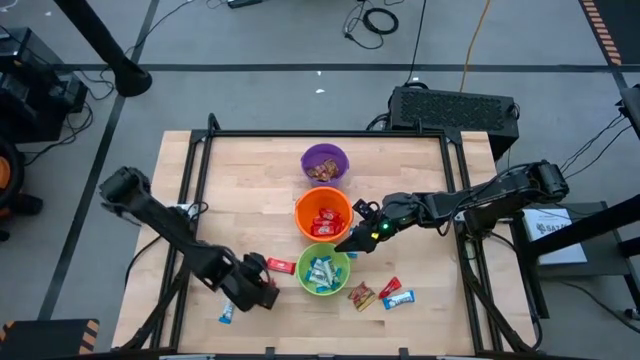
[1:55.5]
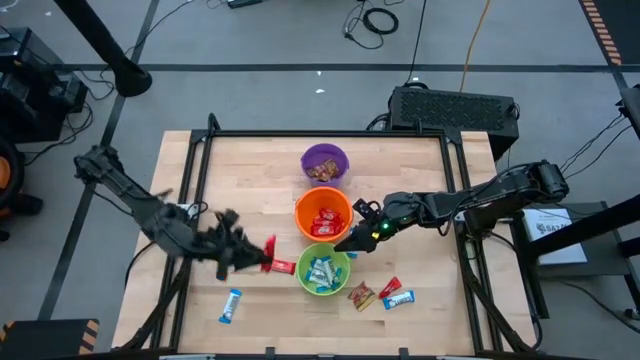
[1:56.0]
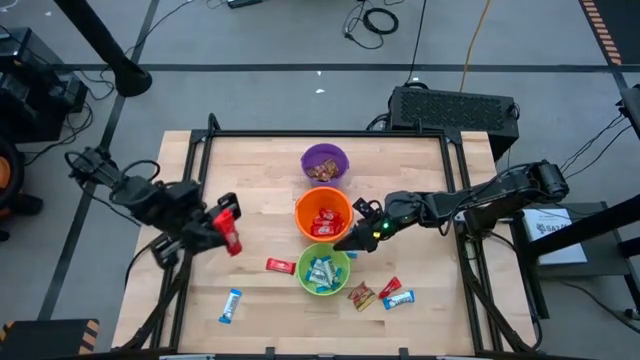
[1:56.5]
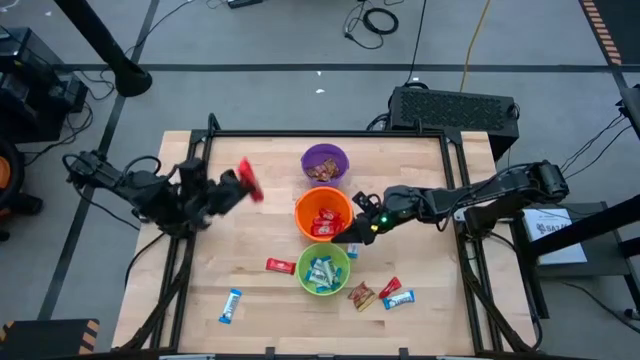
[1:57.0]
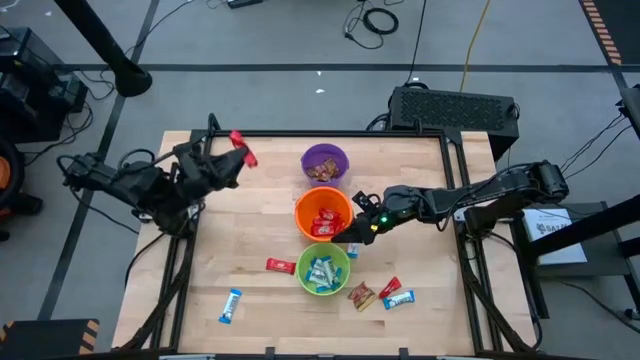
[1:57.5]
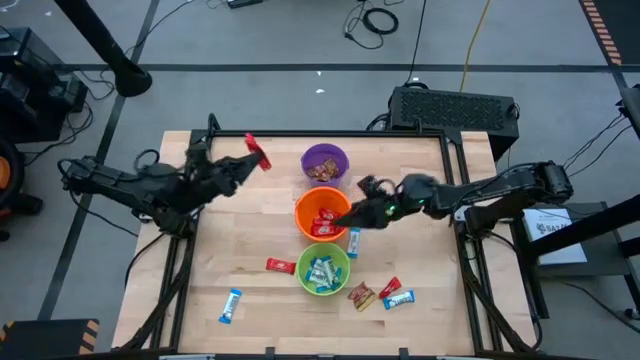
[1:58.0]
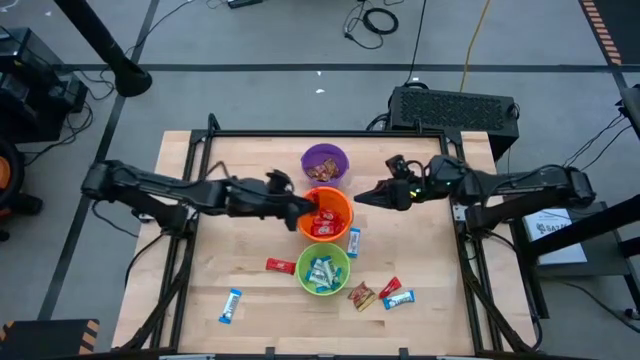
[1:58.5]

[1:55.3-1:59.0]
Task: Sort candy by brand, put in halloween buckets
Put red chocolate bar into the orange bucket

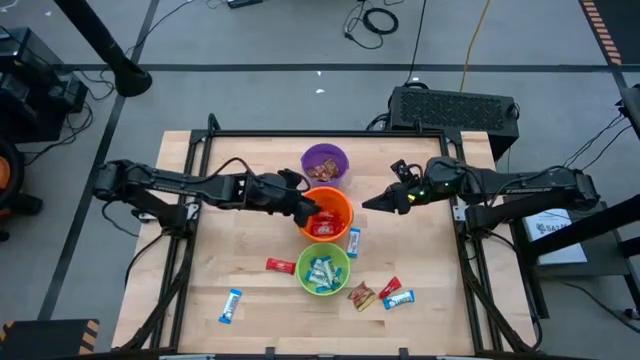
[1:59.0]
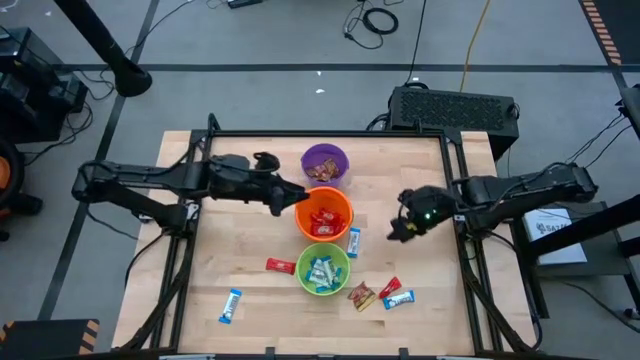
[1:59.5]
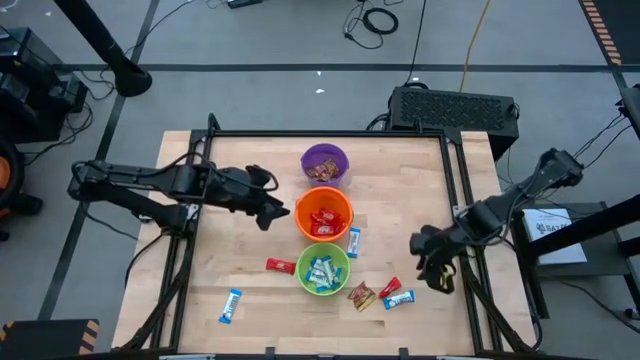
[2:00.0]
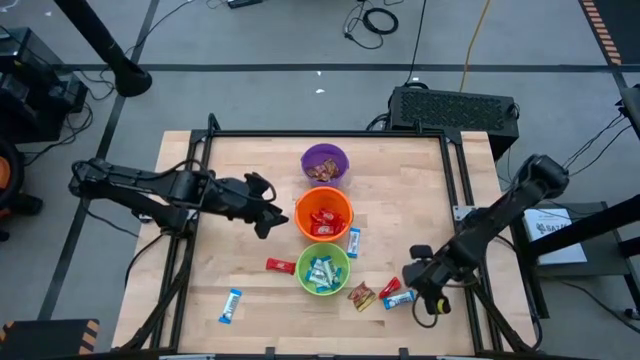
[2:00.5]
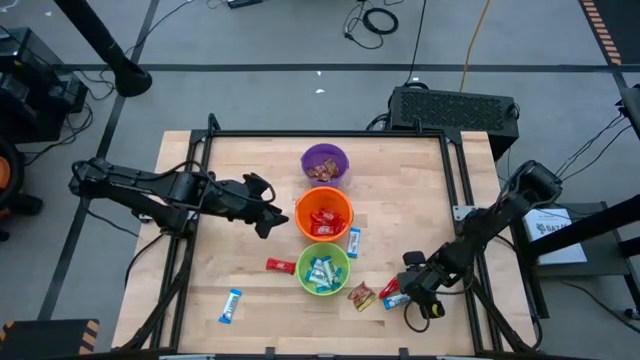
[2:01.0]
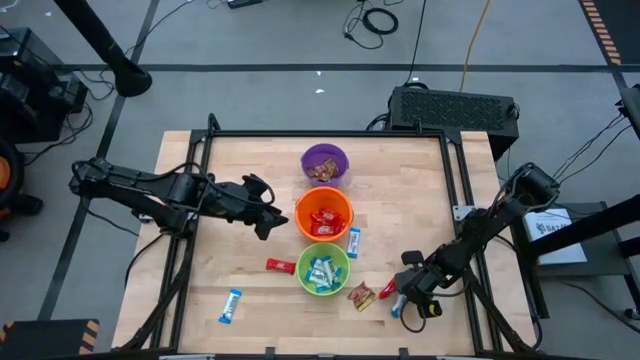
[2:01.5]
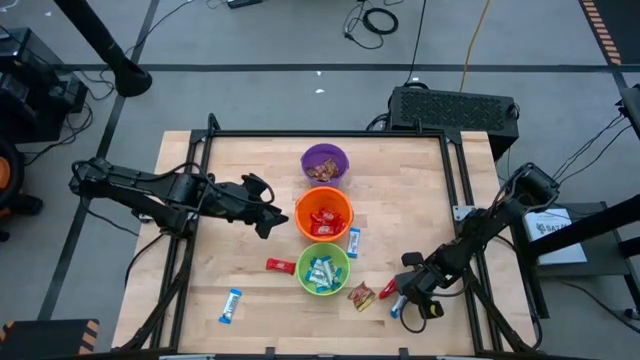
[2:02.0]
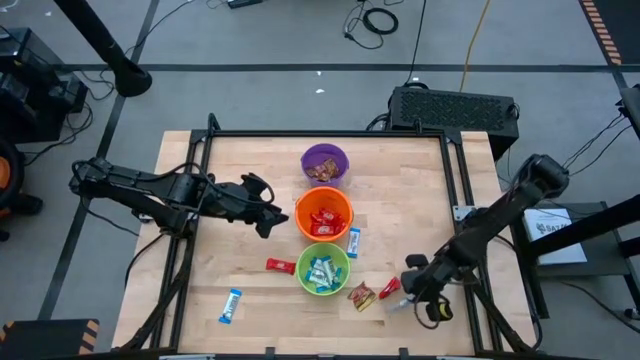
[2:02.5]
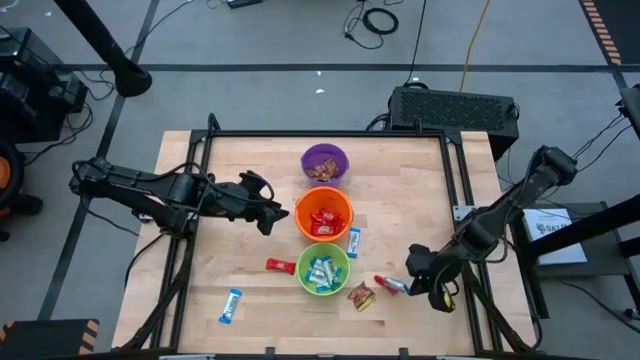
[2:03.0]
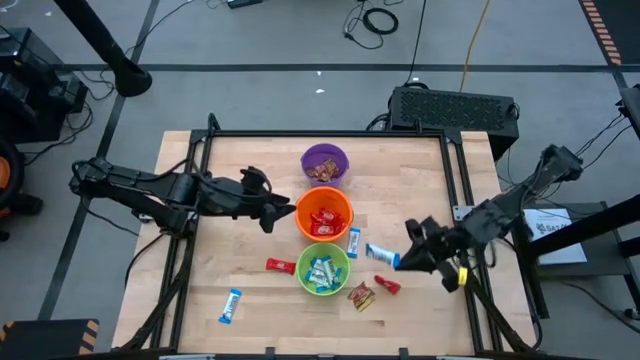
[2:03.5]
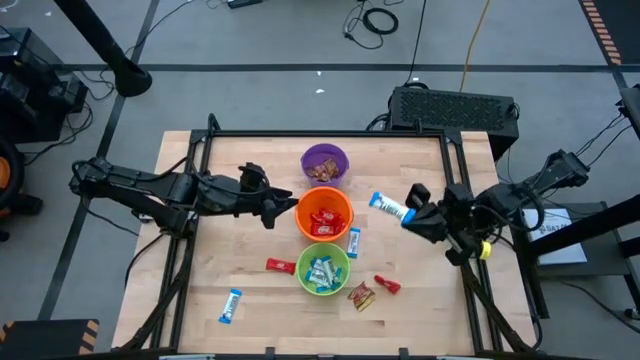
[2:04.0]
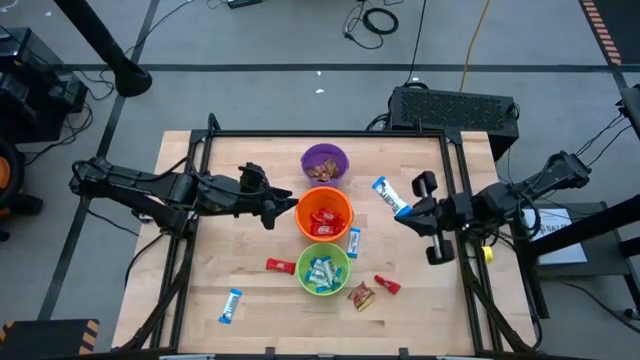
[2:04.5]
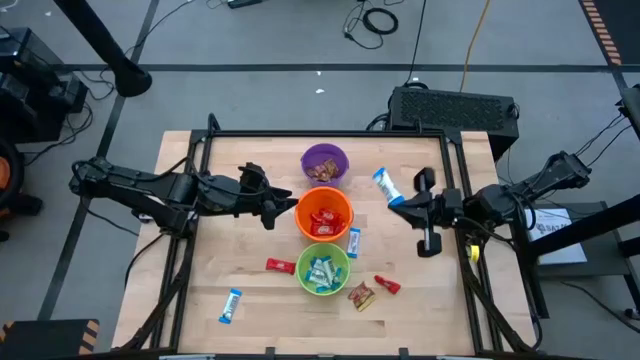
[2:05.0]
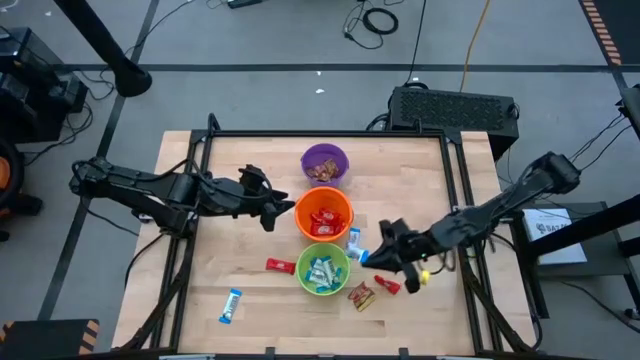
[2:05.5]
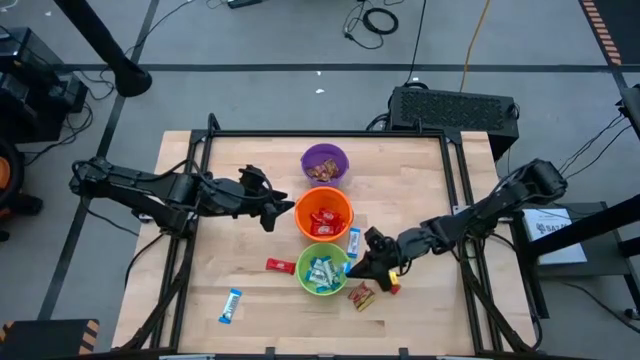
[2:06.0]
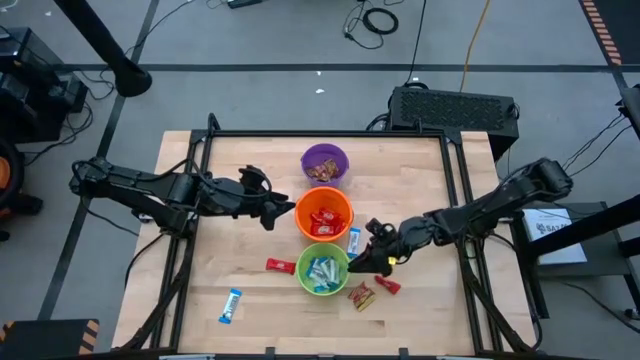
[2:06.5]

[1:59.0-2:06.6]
Put blue chocolate bar into the green bucket

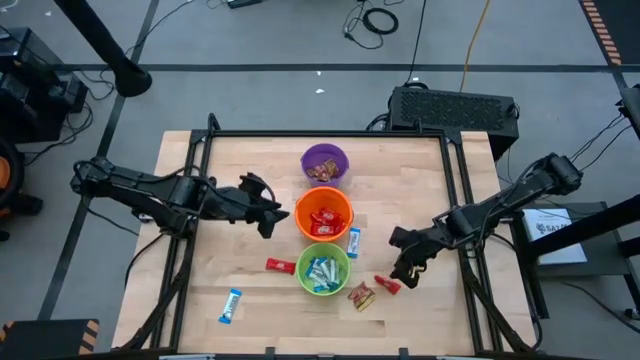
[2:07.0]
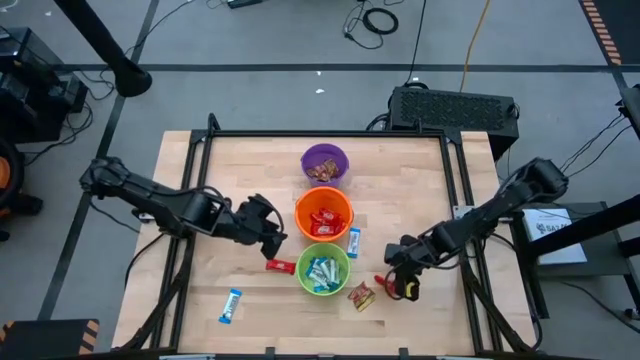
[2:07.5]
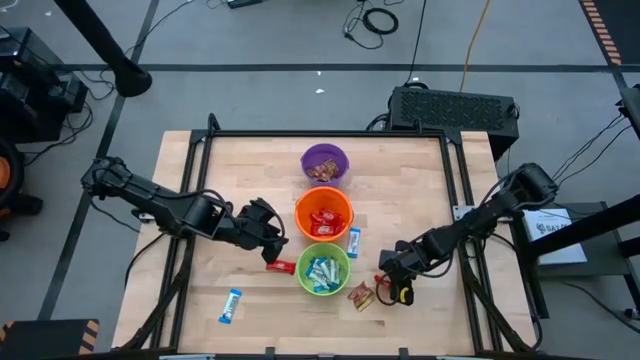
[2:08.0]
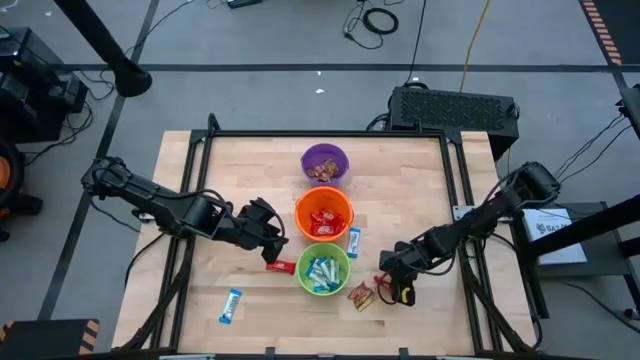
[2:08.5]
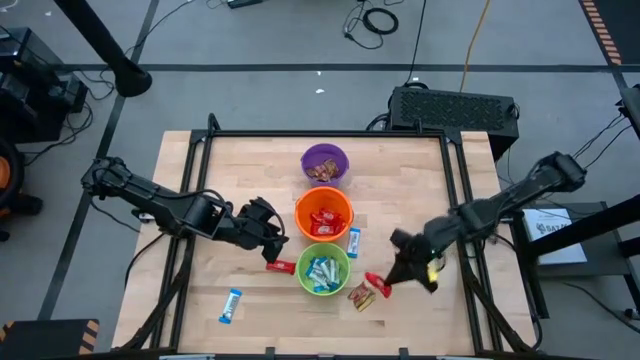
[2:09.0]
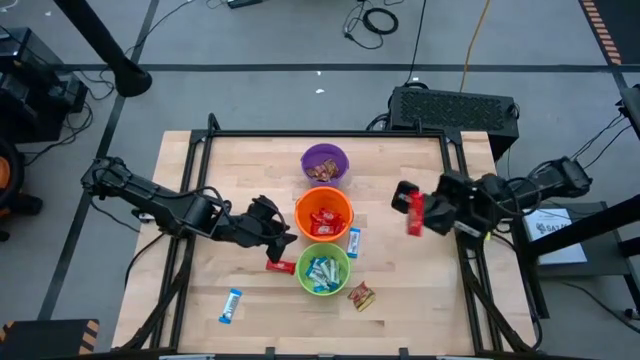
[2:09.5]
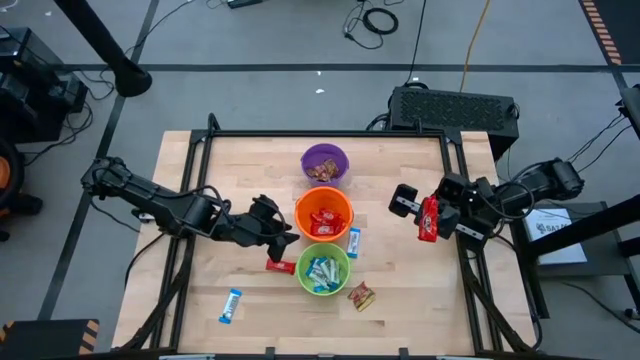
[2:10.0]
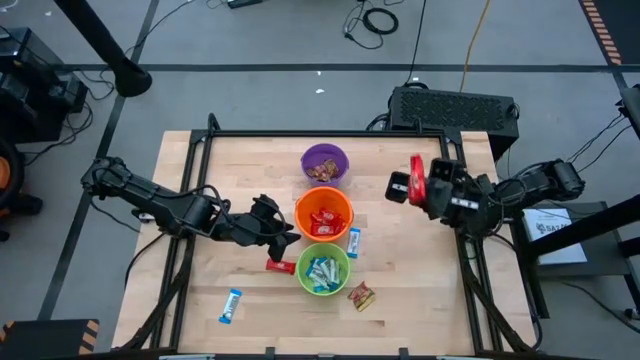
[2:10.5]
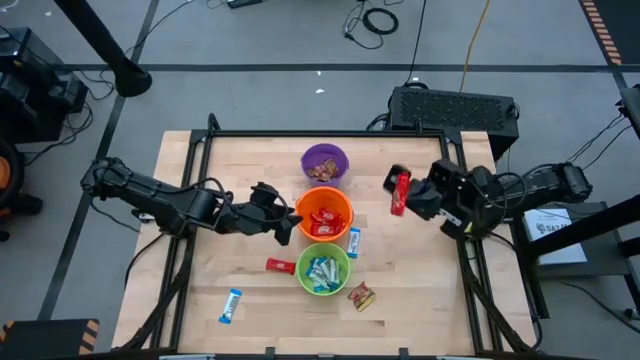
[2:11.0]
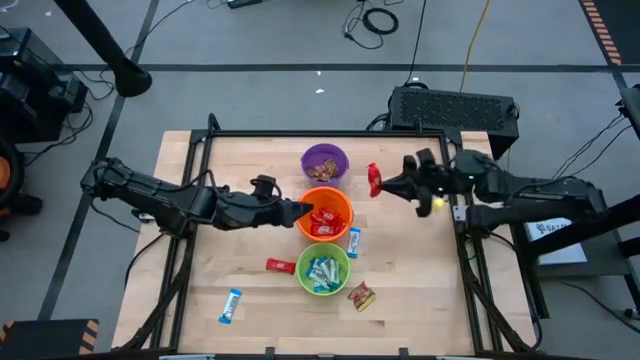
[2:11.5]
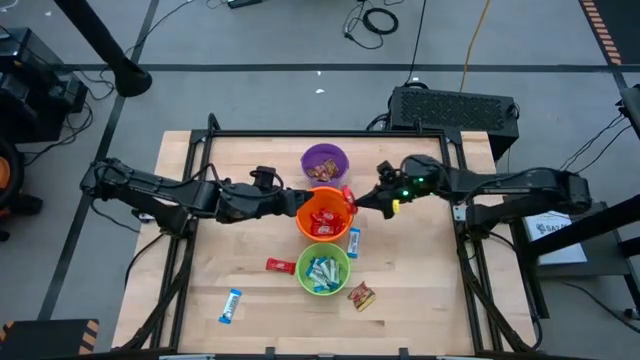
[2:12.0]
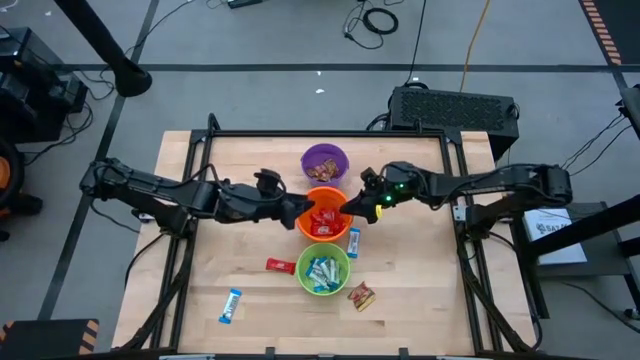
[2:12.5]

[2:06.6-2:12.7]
Put red chocolate bar into the orange bucket

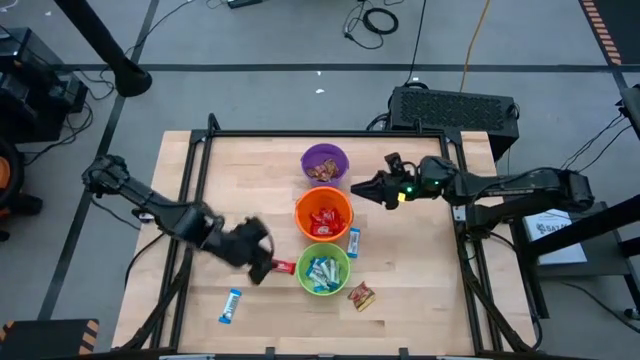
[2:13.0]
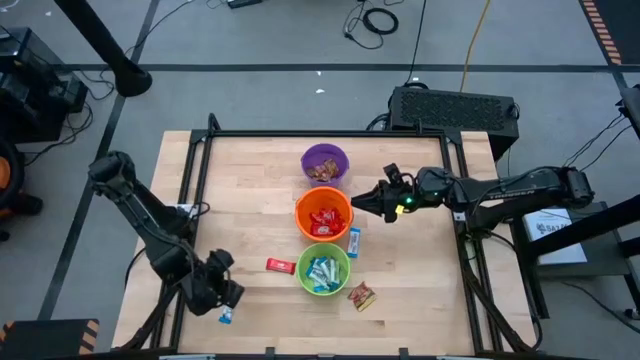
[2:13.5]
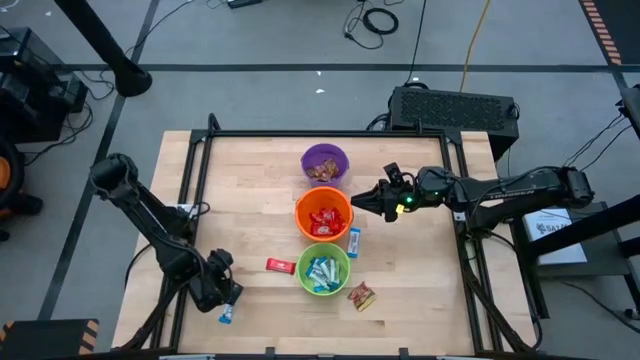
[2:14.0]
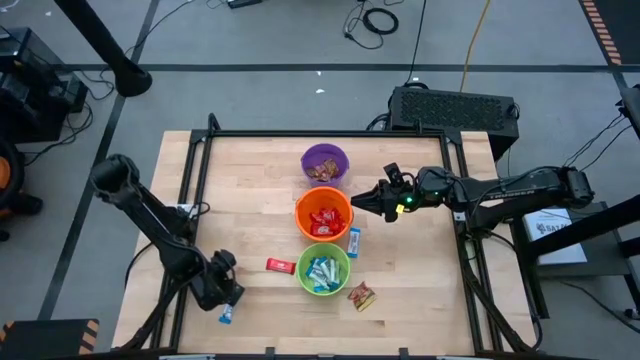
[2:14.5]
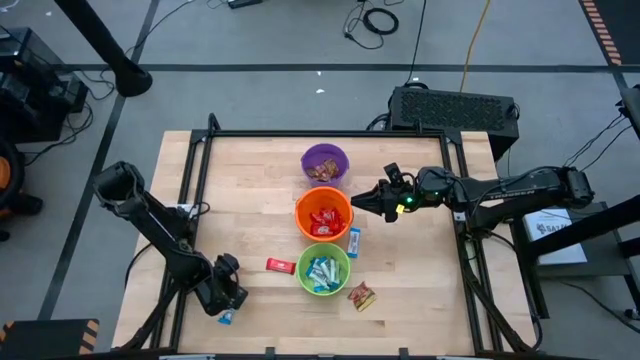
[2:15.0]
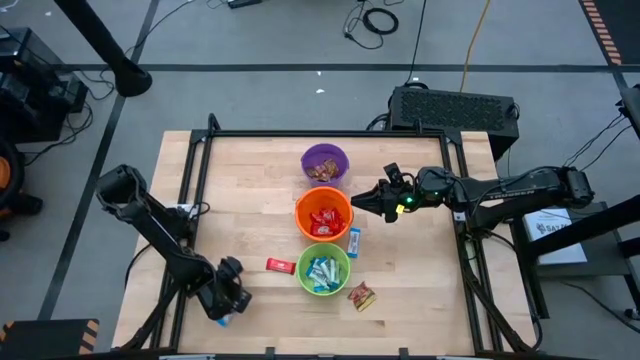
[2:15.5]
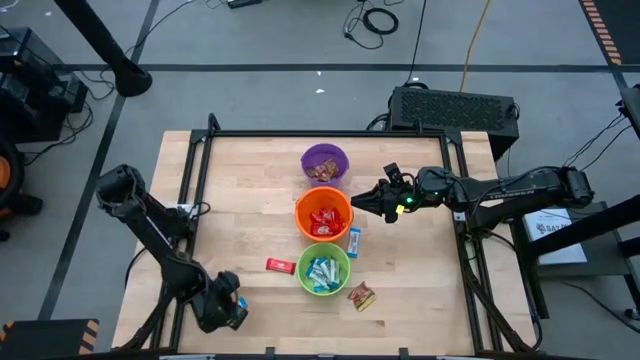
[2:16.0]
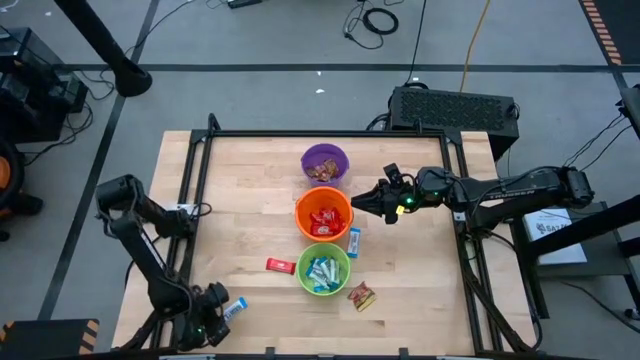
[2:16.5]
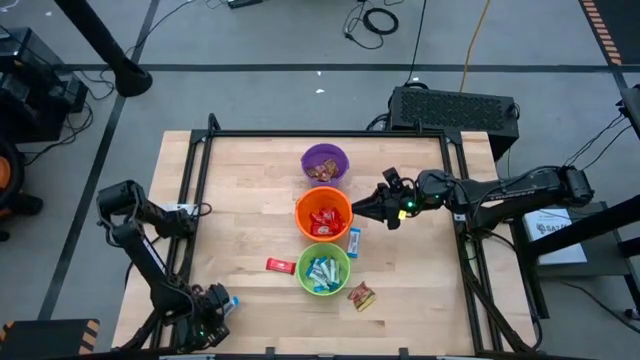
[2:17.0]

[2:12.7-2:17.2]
Put blue chocolate bar into the green bucket
